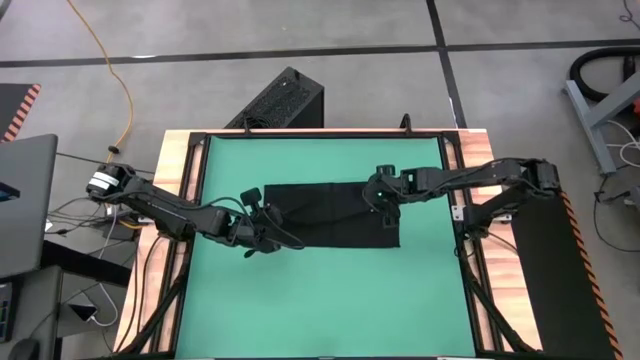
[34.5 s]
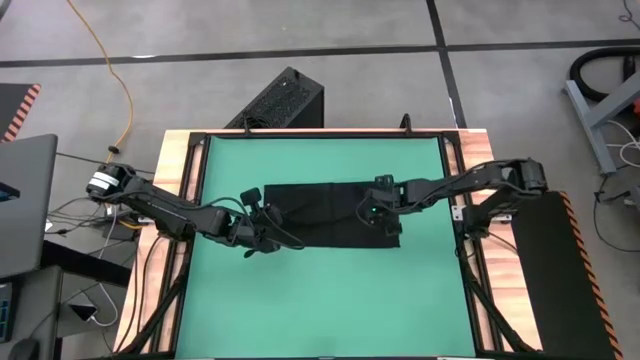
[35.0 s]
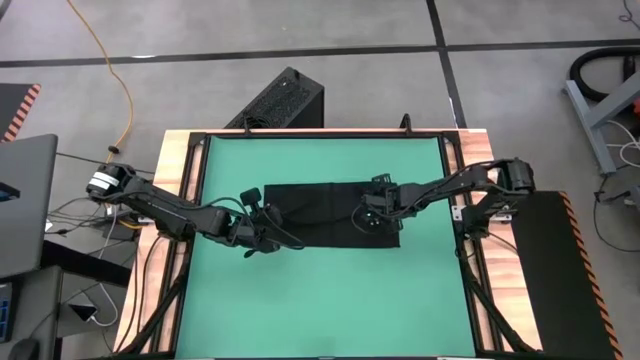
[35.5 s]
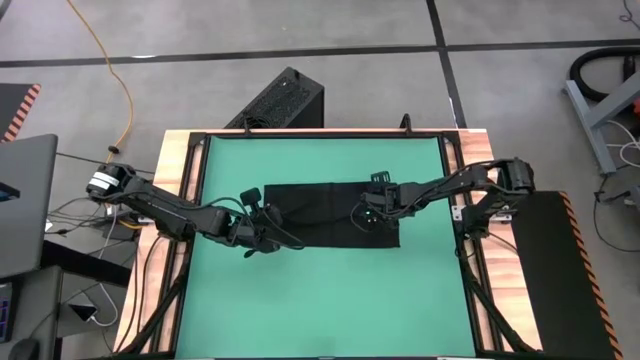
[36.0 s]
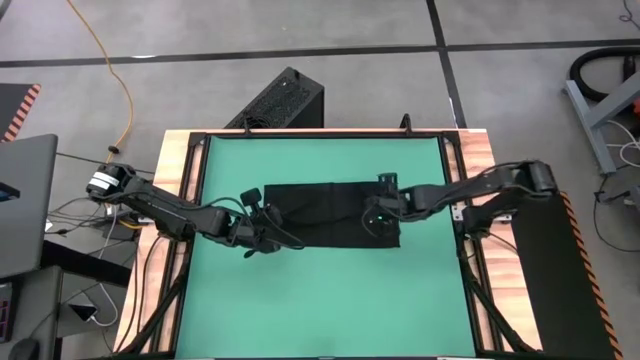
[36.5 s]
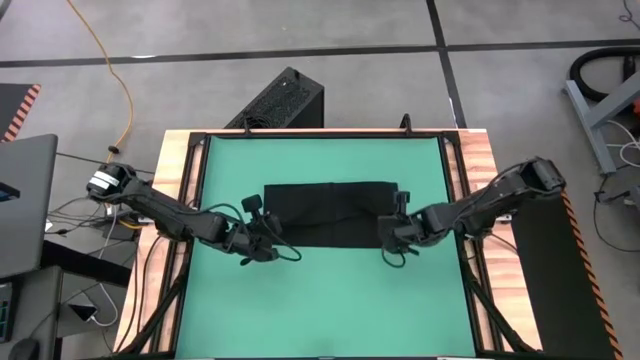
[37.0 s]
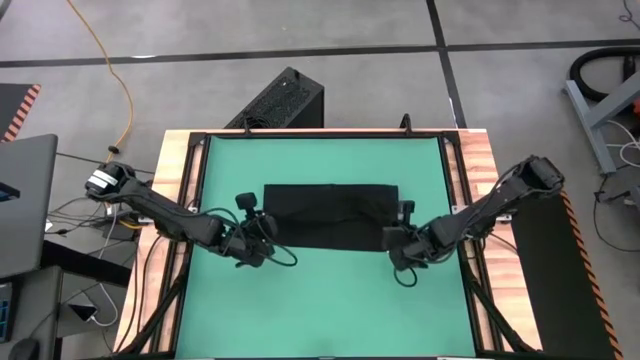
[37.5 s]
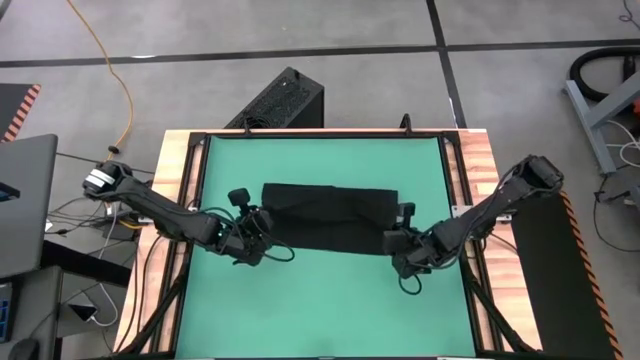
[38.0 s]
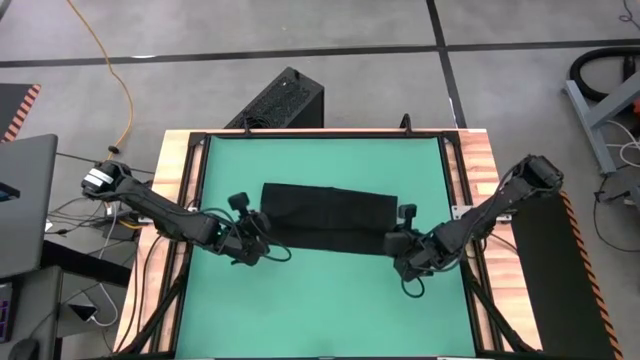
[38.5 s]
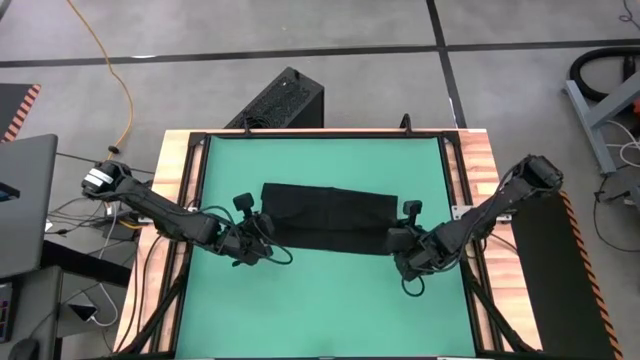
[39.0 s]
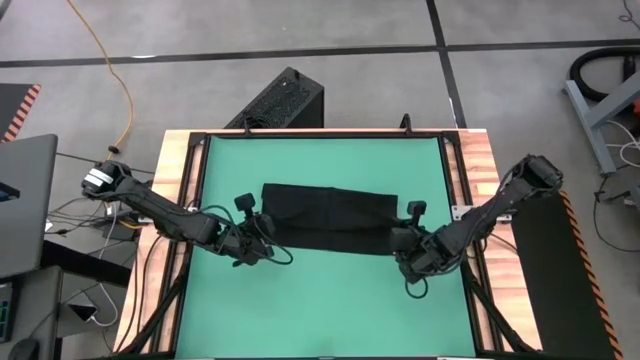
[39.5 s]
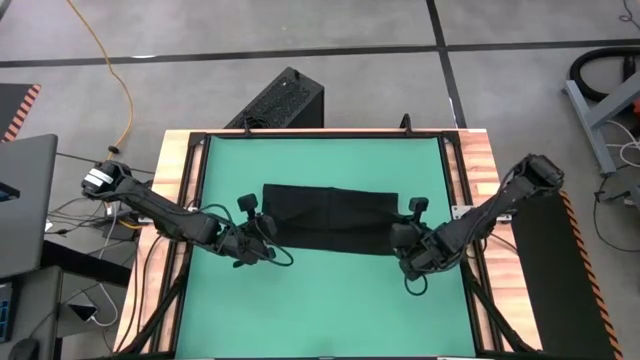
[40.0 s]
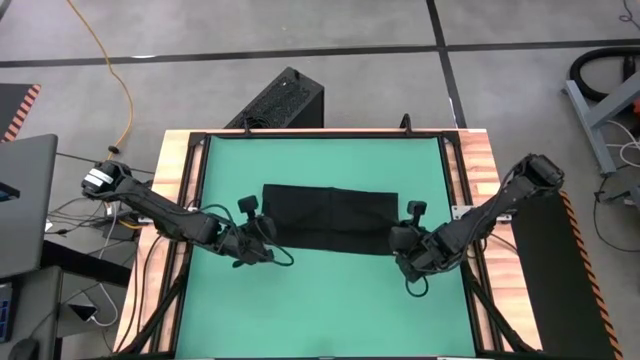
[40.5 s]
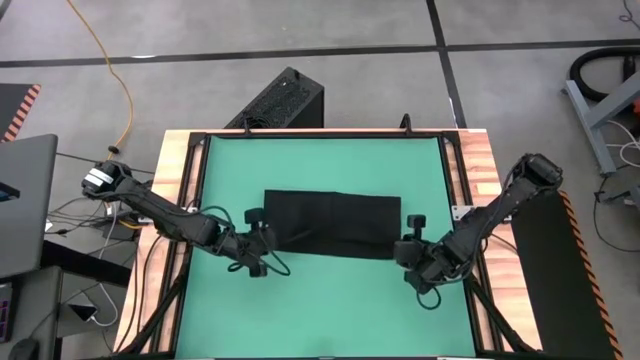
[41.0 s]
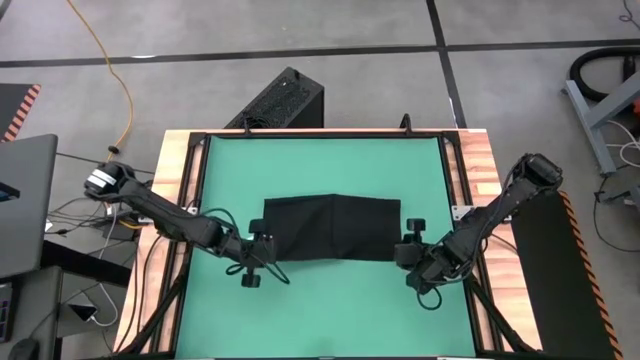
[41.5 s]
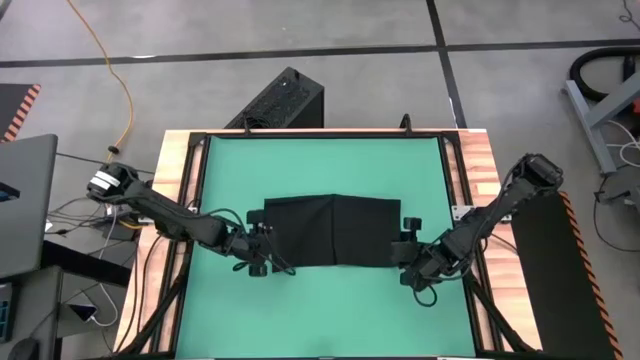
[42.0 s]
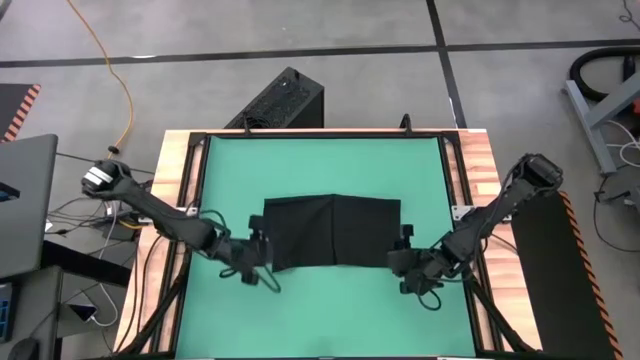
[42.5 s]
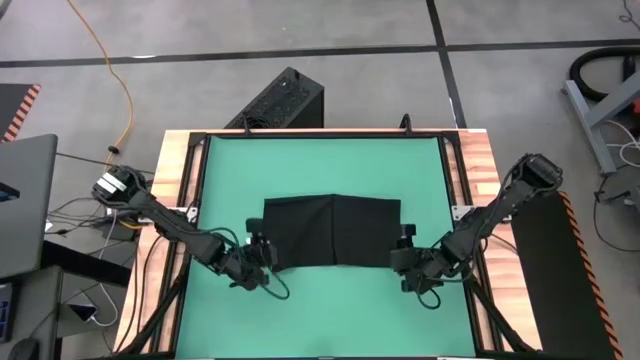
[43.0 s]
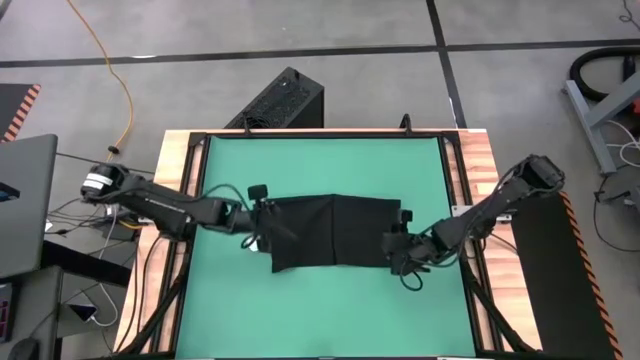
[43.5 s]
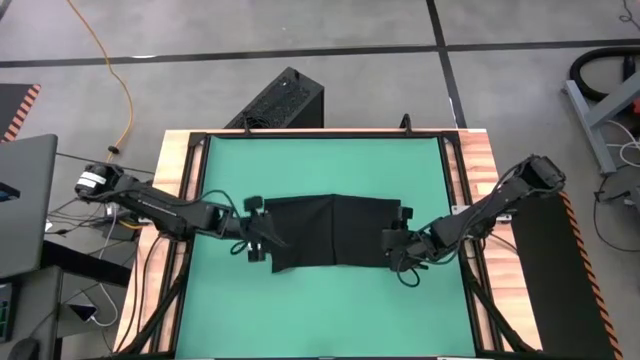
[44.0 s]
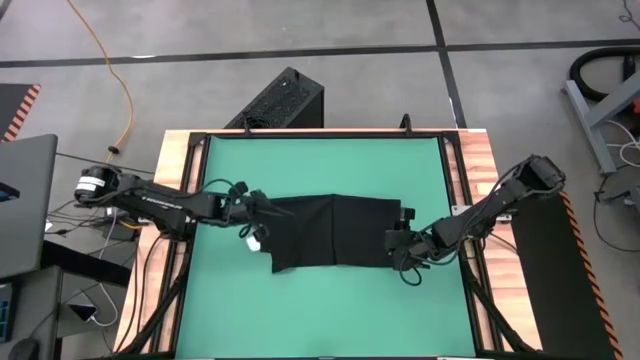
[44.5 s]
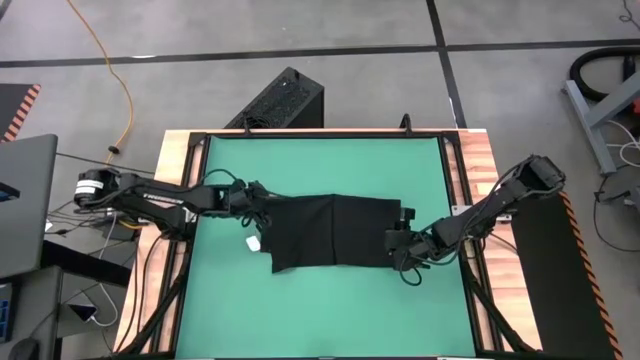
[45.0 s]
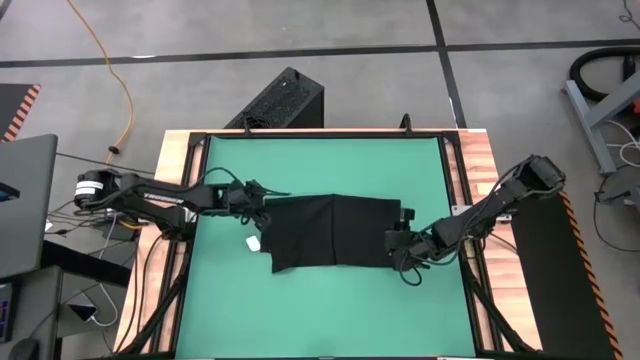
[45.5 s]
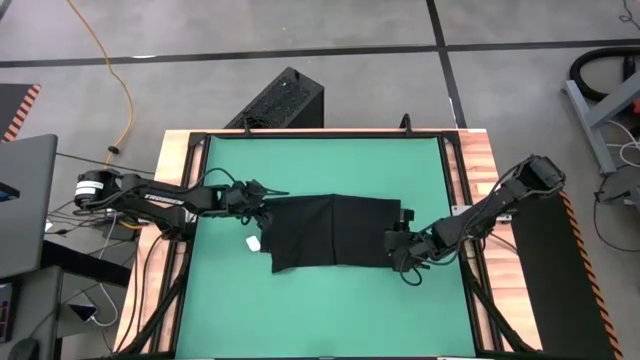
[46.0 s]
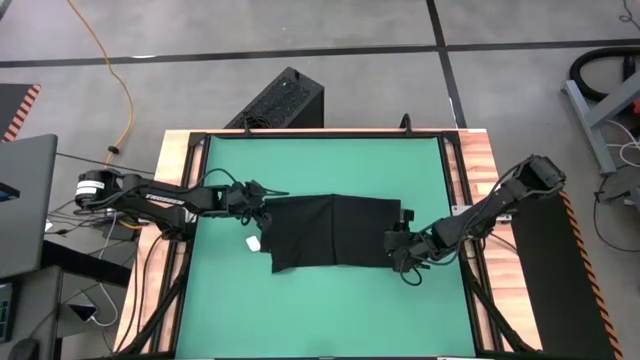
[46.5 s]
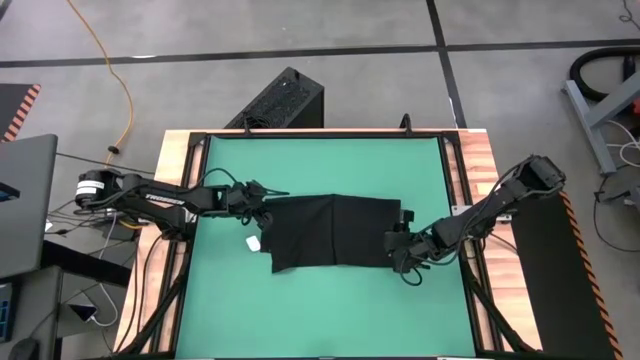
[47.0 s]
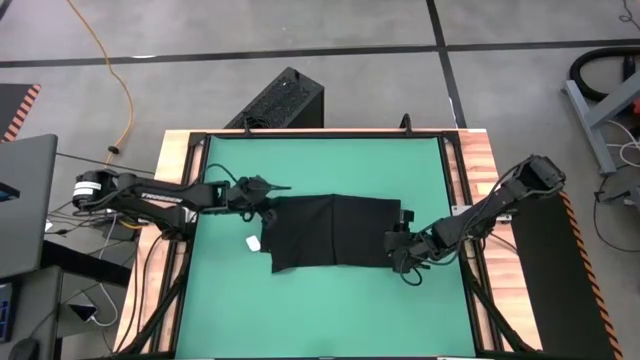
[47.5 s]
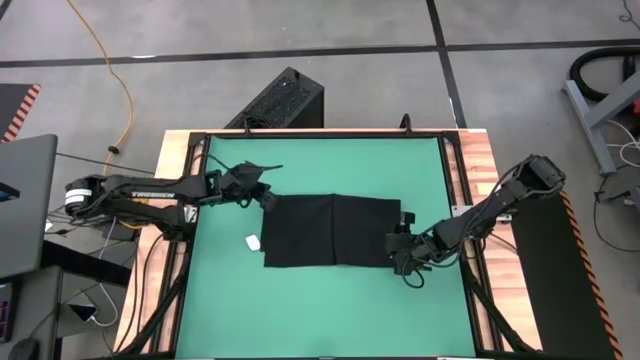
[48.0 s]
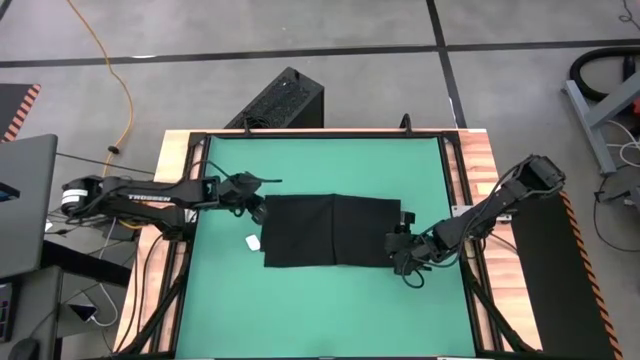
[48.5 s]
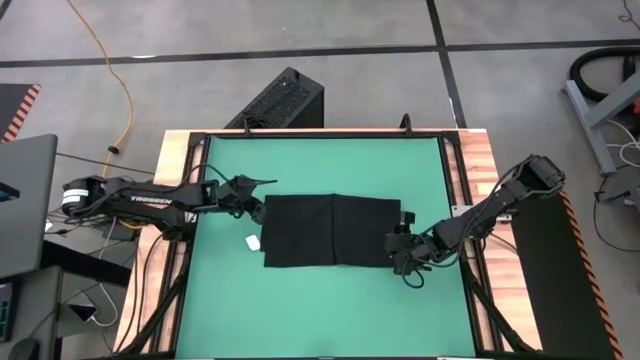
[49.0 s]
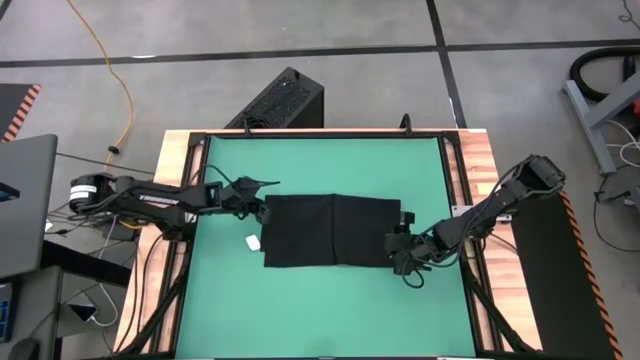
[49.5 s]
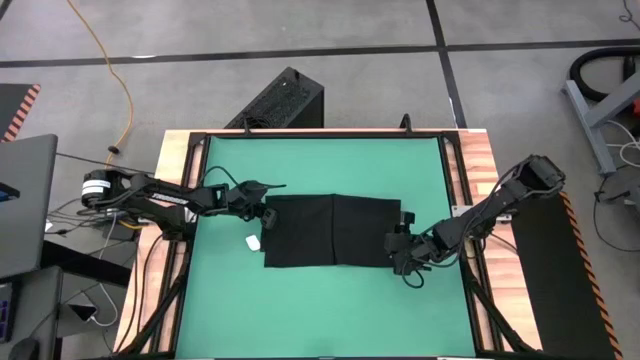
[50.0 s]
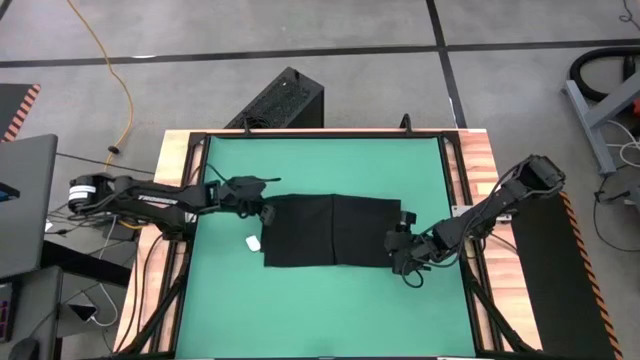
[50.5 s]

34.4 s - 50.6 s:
Task: Roll towel into tight, uniform cylinder
Roll the black towel

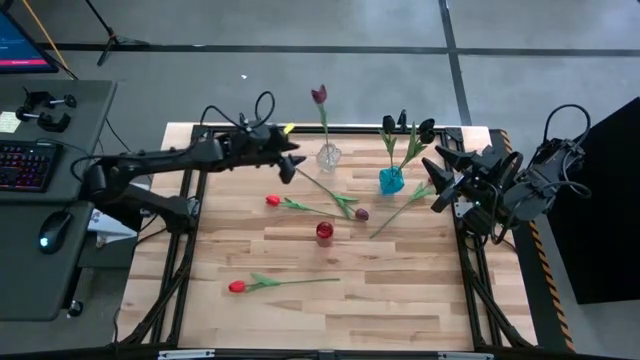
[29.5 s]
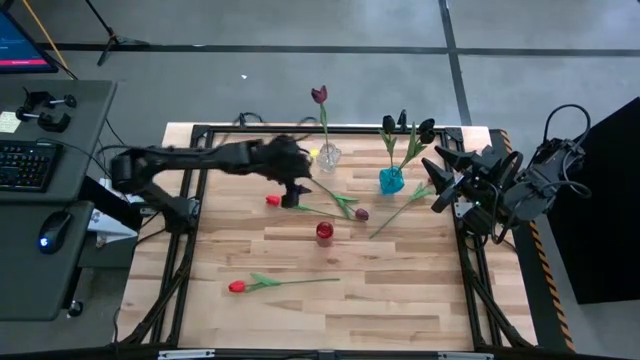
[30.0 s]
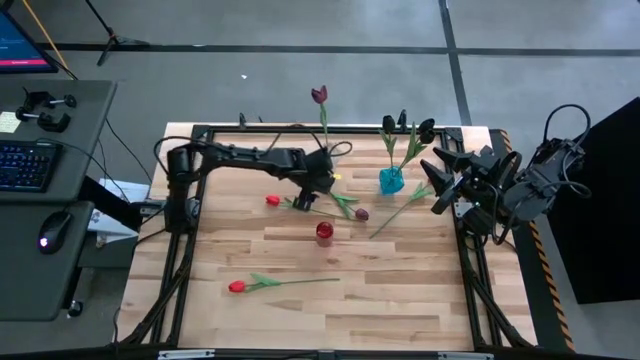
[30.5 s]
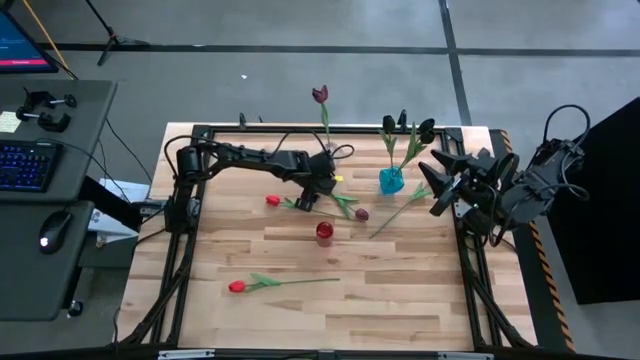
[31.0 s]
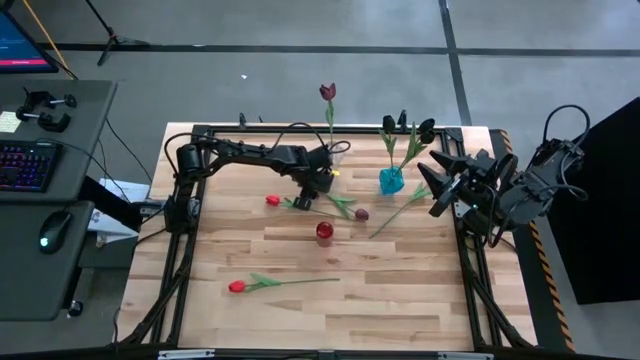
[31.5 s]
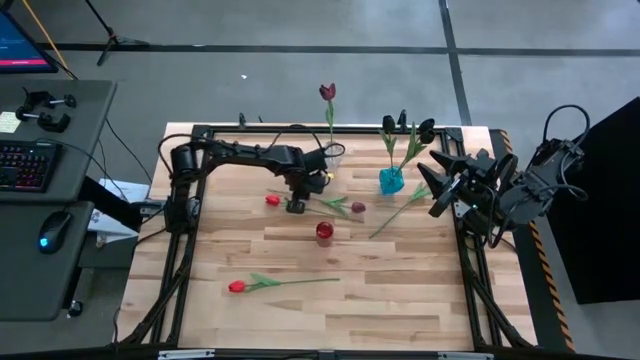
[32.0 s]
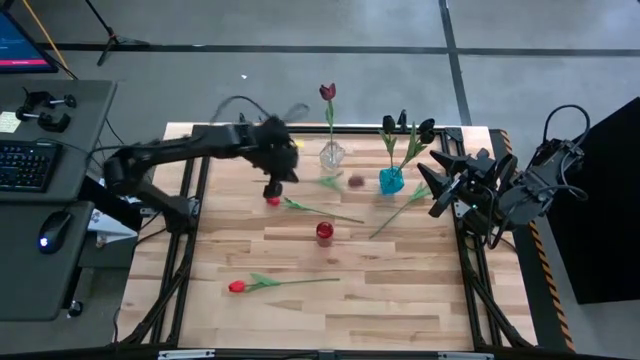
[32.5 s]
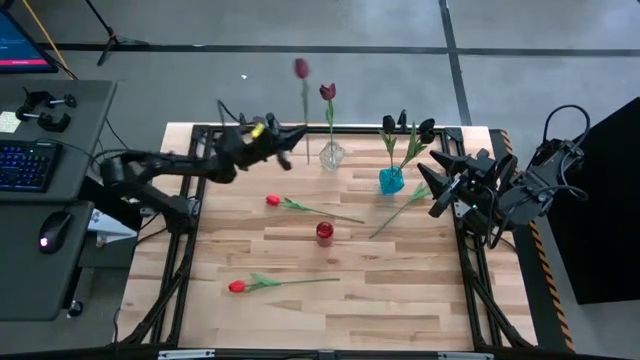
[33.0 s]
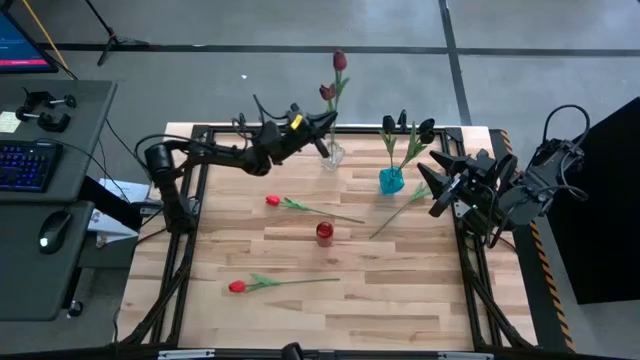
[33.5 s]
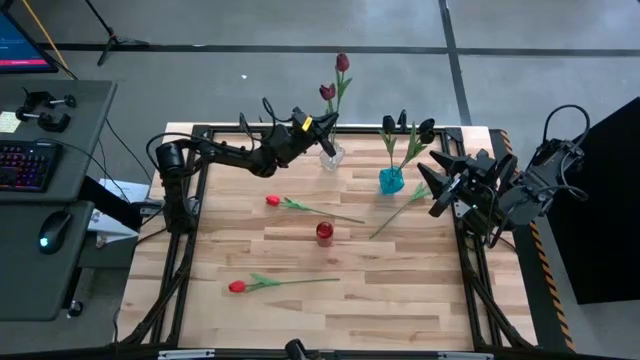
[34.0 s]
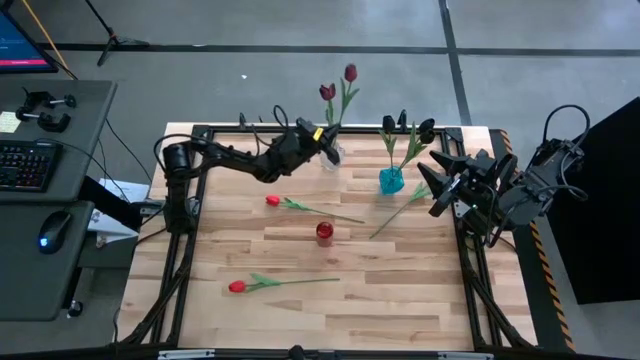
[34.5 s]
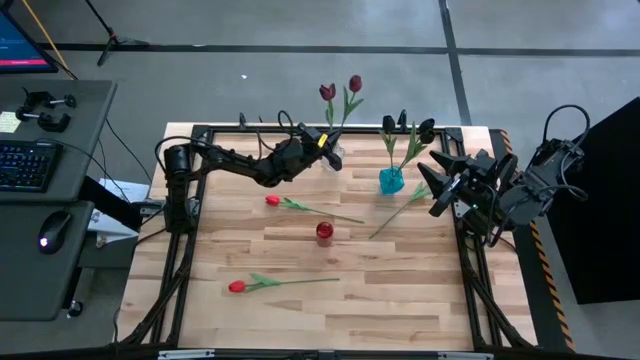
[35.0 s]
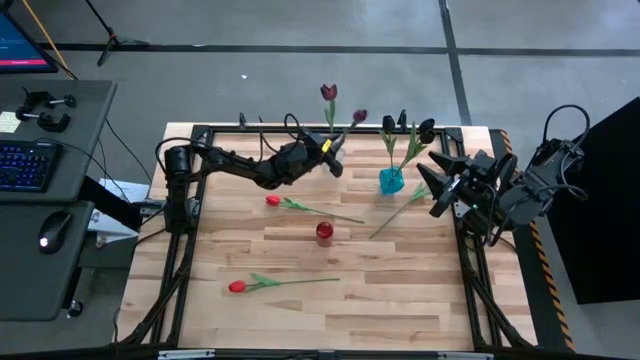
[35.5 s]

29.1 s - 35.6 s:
Task: Sort flowers into vase by color
Put the left dark red flower into the transparent vase
